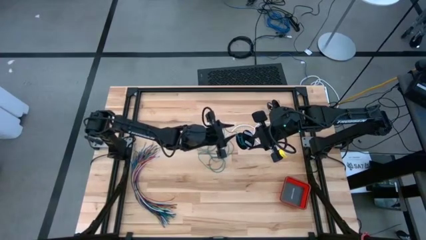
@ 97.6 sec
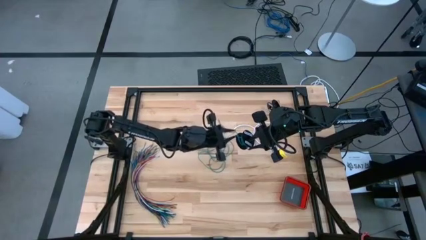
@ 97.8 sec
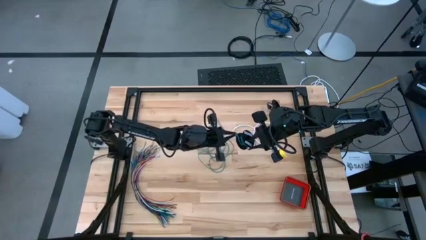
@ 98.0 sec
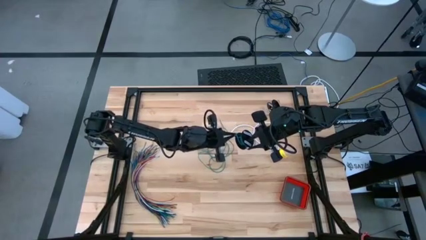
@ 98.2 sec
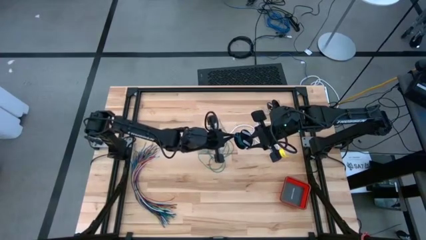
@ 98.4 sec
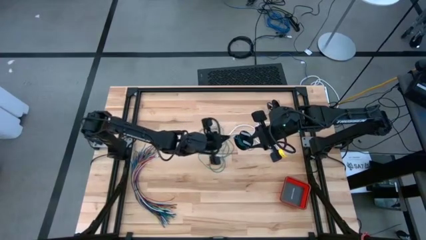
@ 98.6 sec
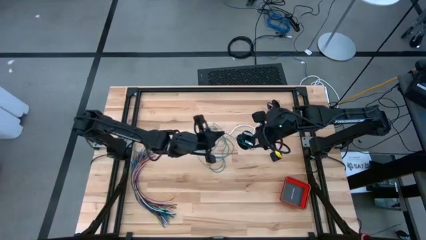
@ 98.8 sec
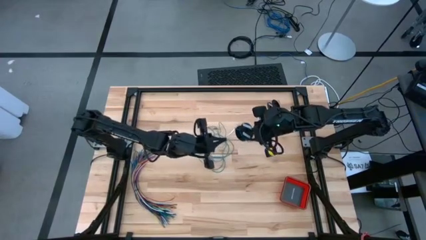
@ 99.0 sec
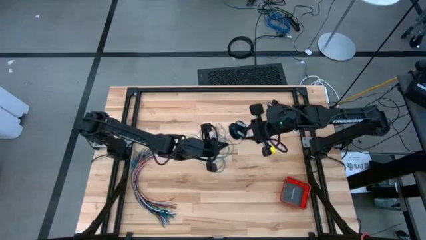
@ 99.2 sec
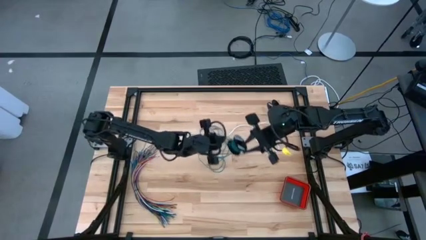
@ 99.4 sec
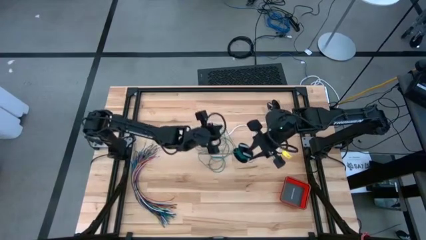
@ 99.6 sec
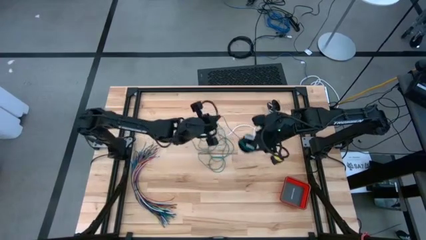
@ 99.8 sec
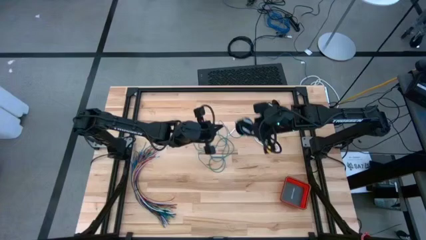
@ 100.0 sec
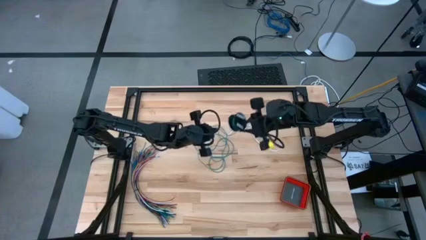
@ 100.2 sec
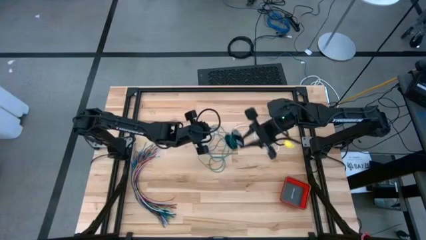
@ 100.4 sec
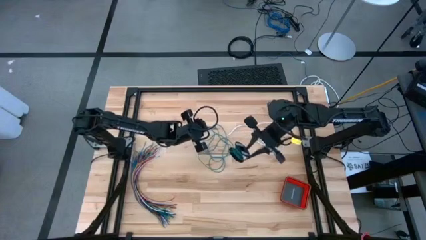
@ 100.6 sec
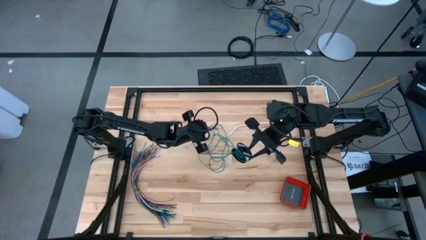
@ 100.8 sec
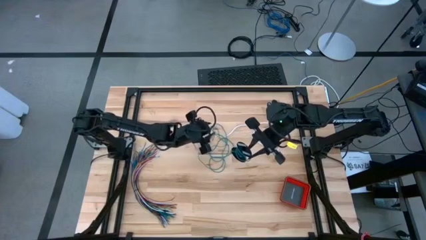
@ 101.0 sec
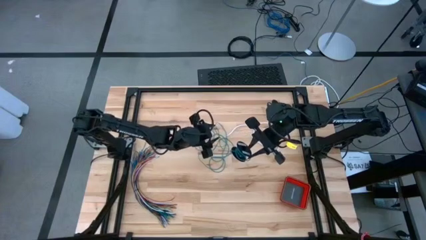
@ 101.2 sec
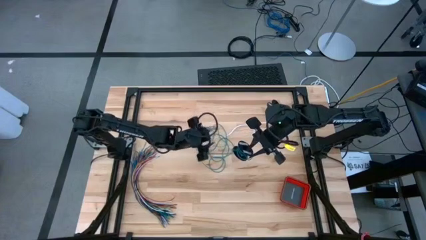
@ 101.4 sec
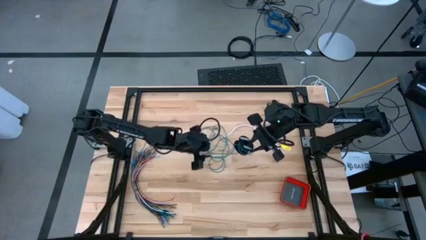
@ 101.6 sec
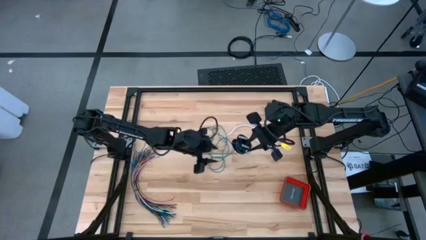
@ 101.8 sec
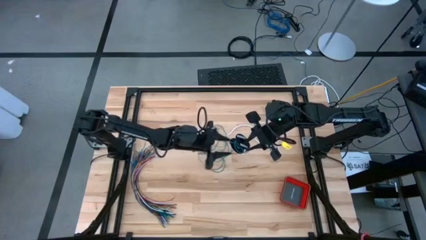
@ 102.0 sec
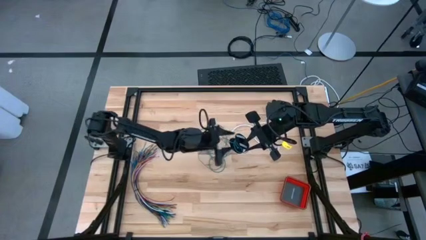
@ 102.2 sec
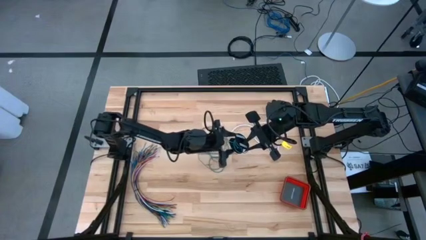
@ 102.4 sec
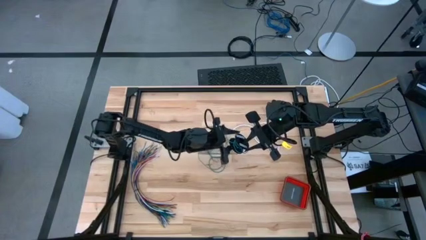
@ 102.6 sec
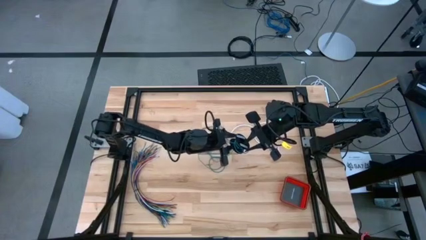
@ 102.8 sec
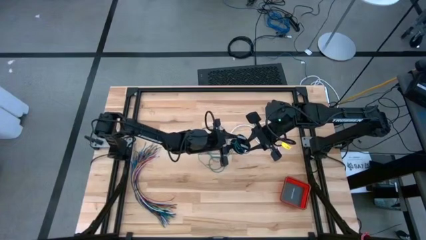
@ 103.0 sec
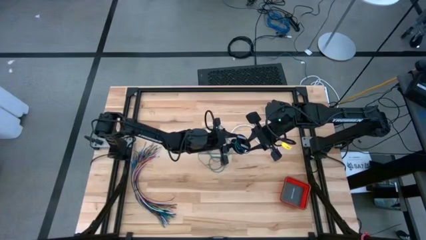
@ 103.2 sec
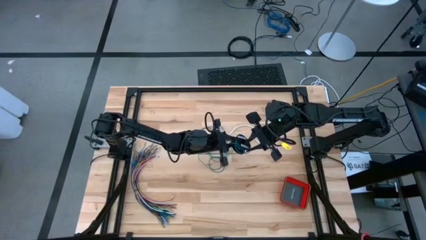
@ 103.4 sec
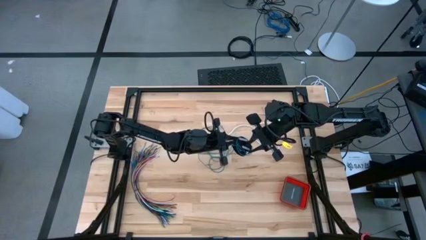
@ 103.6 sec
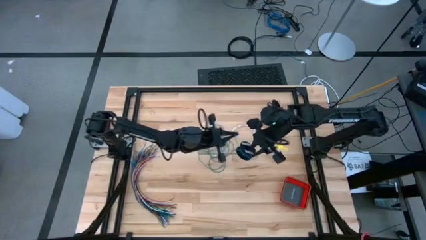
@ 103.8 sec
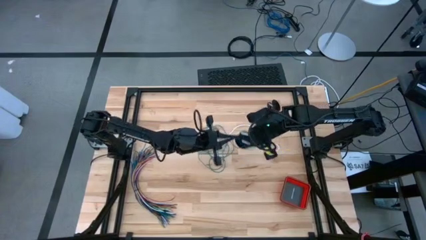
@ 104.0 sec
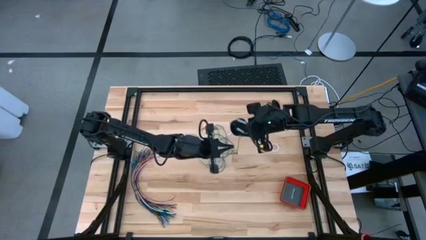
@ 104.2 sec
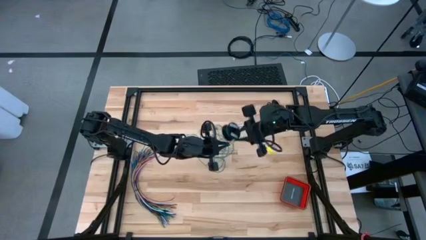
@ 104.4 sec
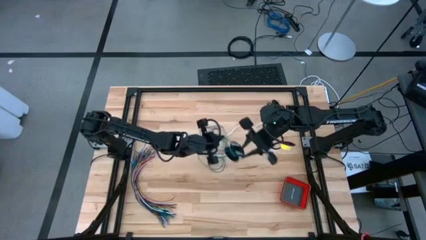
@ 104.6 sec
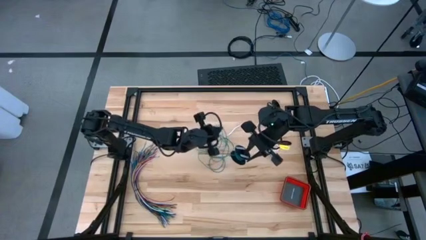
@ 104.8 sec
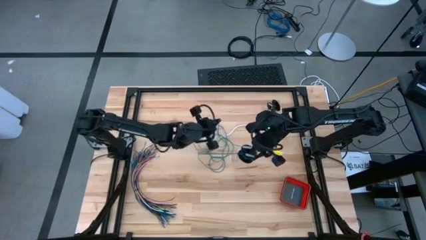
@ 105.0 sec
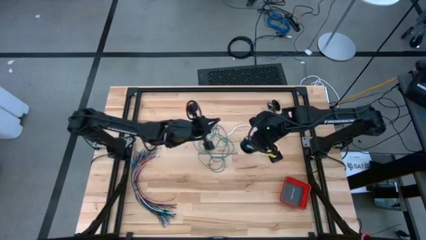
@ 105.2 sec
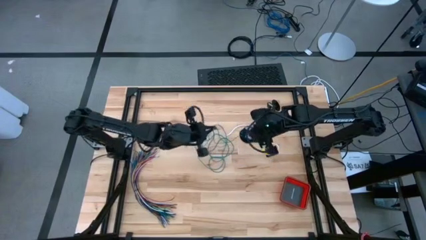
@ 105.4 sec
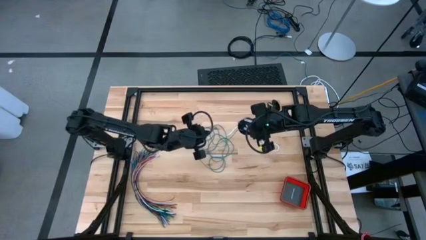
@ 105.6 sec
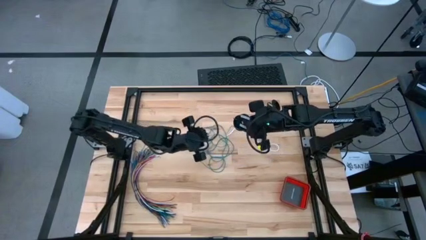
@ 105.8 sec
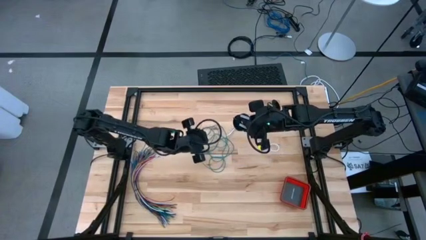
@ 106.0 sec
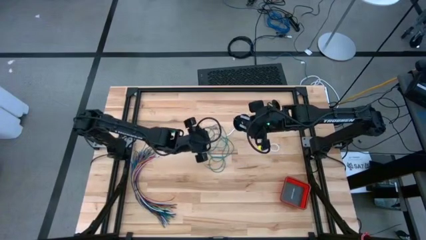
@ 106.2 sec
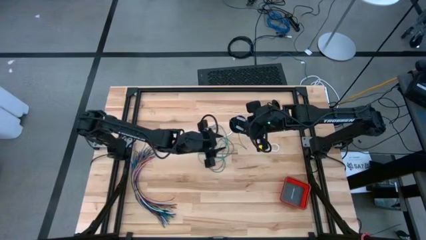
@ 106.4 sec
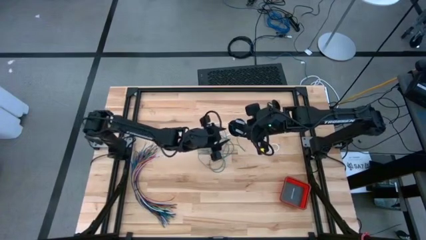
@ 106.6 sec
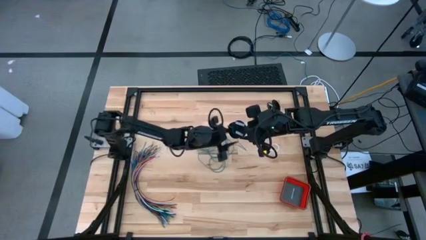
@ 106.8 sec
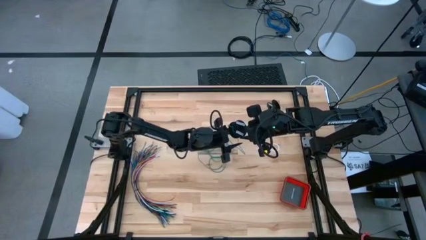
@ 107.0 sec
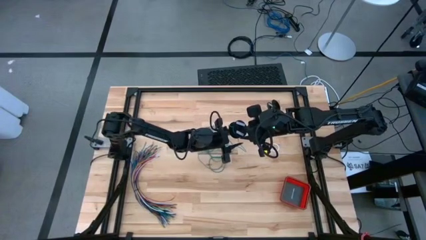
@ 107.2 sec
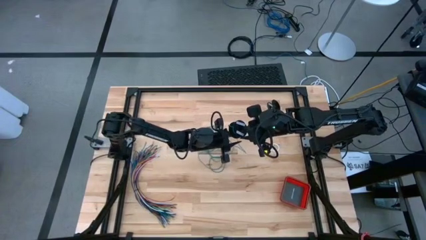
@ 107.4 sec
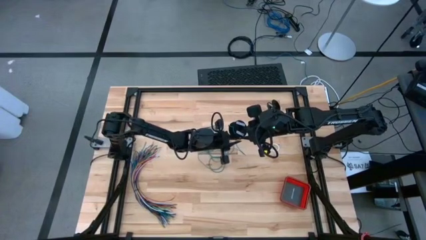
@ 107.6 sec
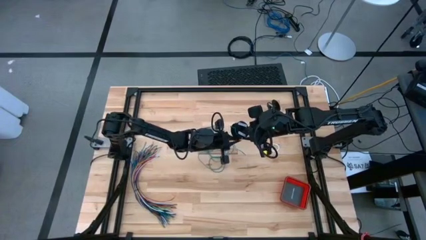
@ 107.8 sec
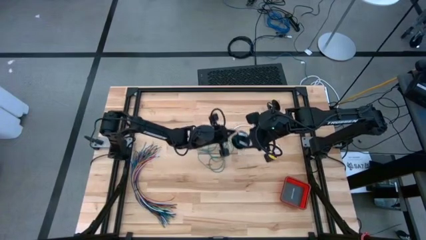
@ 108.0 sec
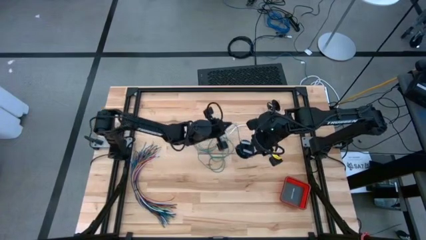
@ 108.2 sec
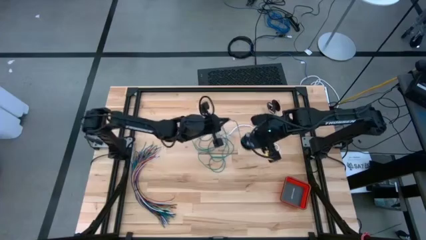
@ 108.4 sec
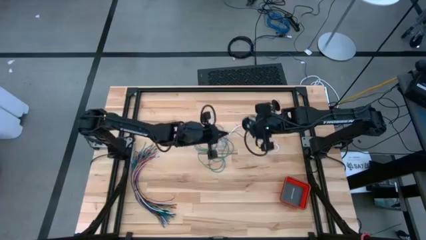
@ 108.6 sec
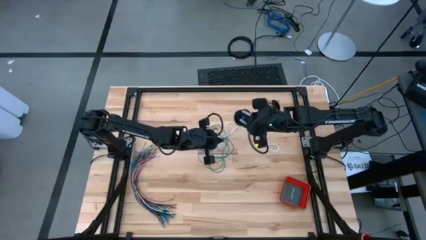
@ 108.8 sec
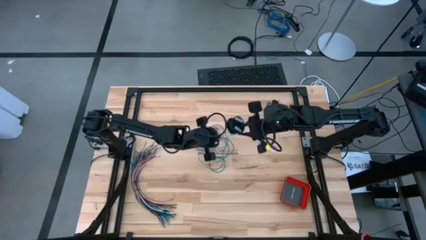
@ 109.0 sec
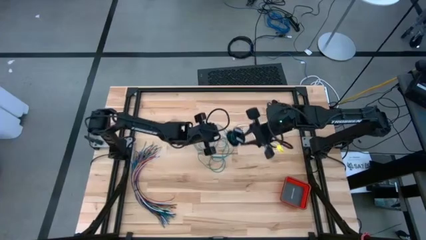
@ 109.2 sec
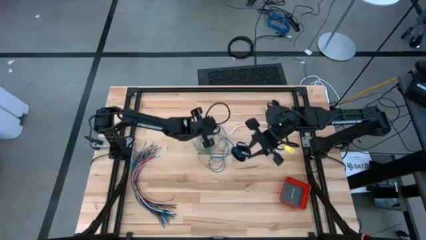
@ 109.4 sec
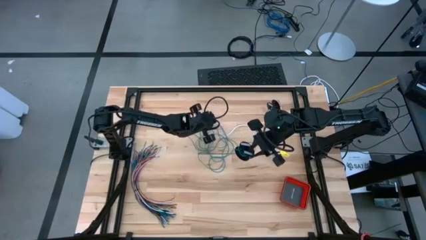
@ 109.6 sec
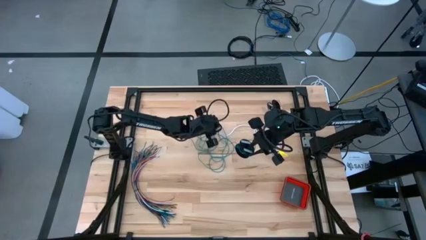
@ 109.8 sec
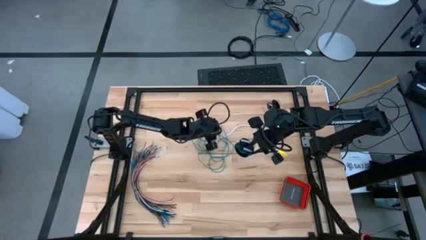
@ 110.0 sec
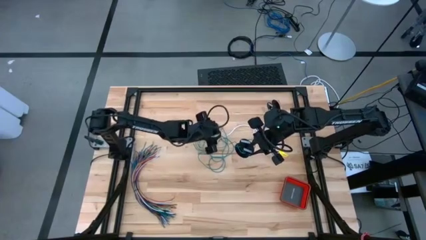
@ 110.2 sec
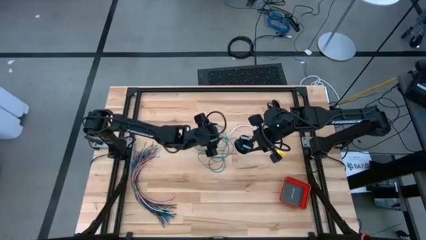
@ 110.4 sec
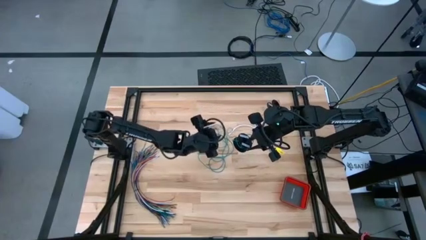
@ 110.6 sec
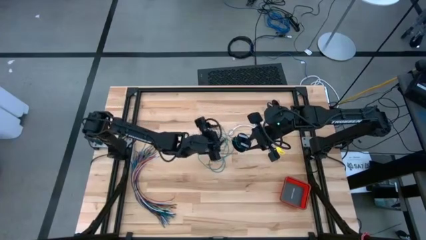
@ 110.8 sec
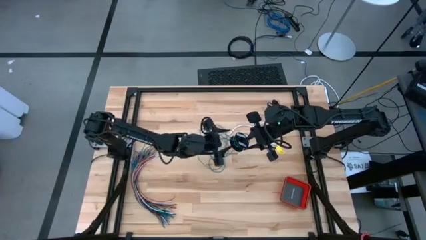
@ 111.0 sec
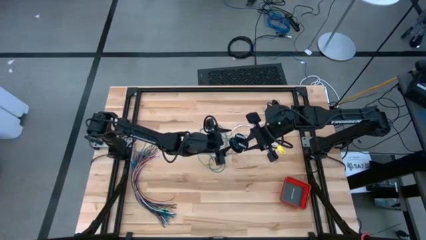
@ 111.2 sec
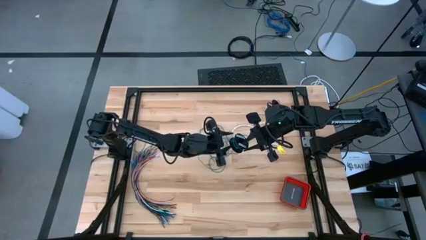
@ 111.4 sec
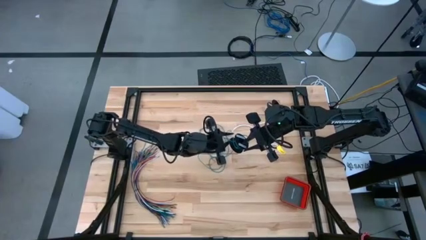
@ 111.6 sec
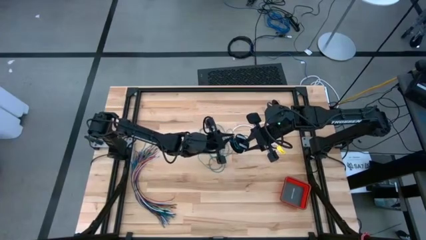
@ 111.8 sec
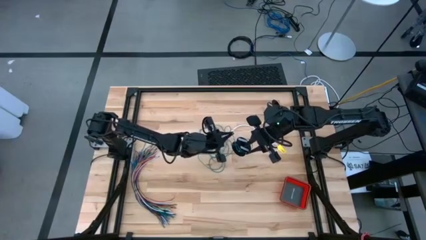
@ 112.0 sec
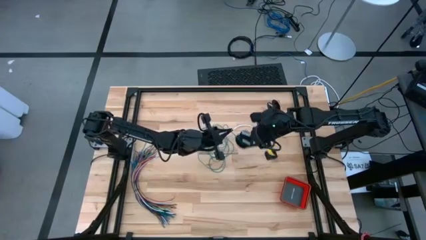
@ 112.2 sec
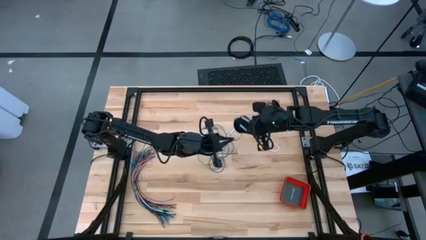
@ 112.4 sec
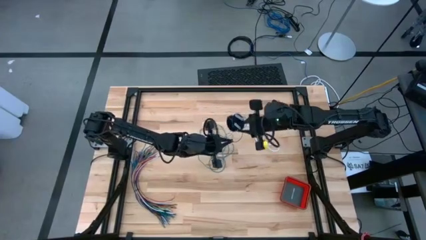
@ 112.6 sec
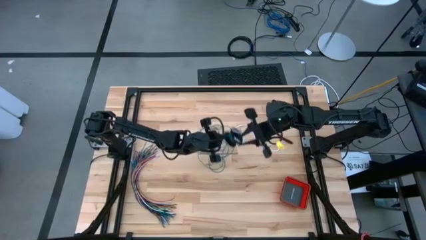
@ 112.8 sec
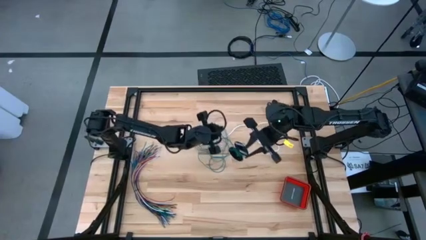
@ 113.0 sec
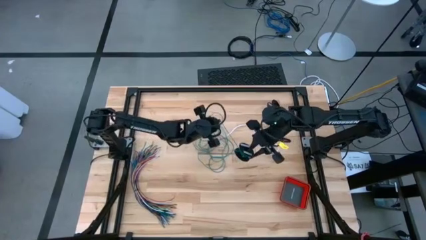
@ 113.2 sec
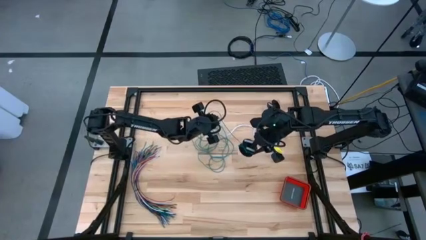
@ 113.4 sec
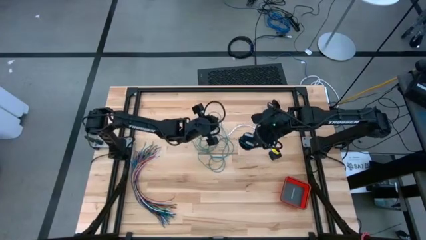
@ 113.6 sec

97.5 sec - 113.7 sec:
Task: Coil cords
Uncoil the green wire from the spool

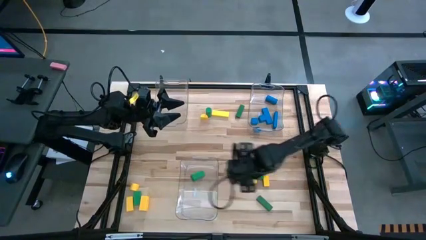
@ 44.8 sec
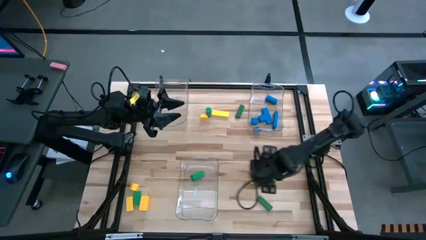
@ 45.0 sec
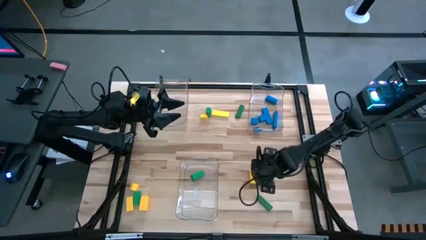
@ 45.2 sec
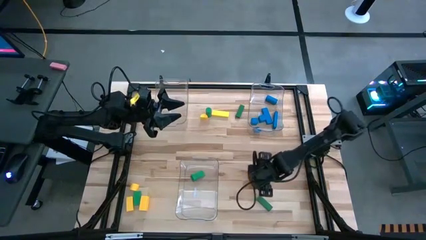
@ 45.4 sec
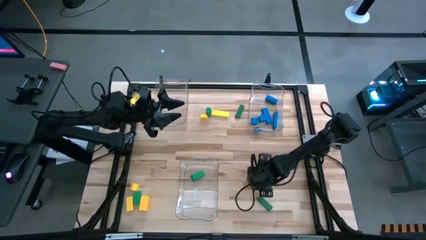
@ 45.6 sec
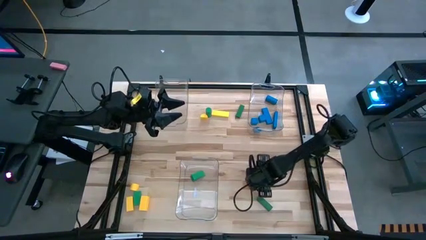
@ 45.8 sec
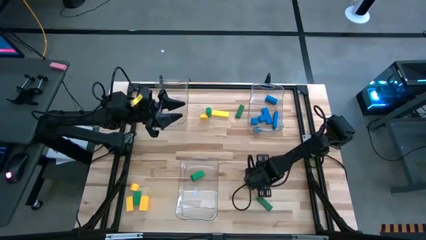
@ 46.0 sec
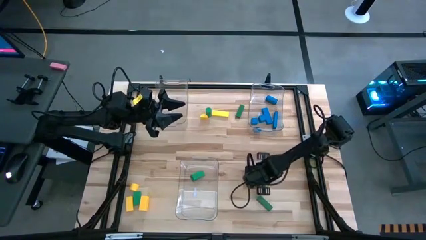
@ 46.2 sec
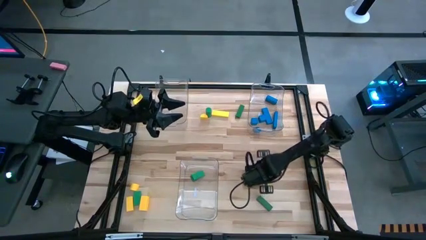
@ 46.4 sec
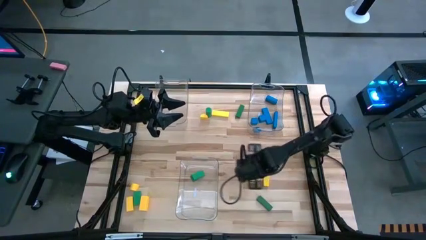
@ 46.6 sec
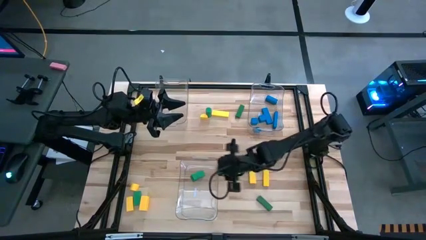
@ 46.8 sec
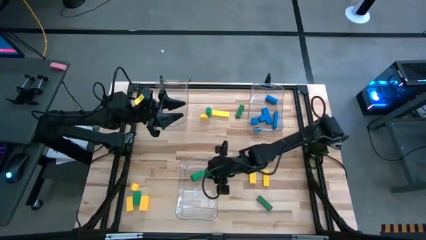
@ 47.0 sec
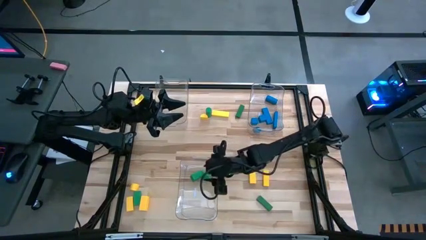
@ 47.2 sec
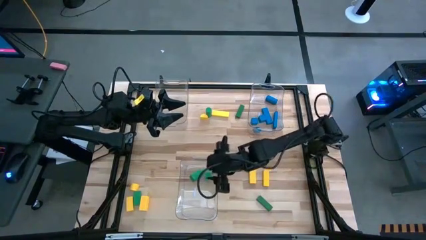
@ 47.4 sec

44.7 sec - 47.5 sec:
Task: Sort blocks
Put the green block into the bottom transparent bin
